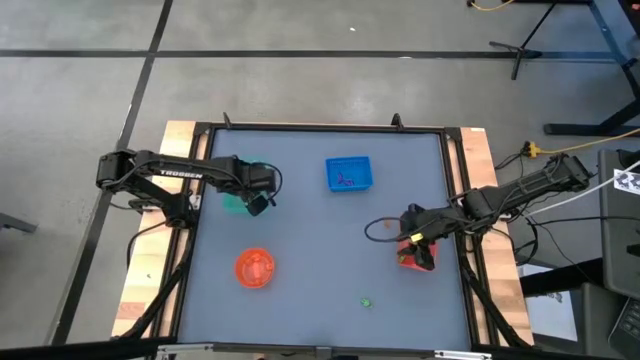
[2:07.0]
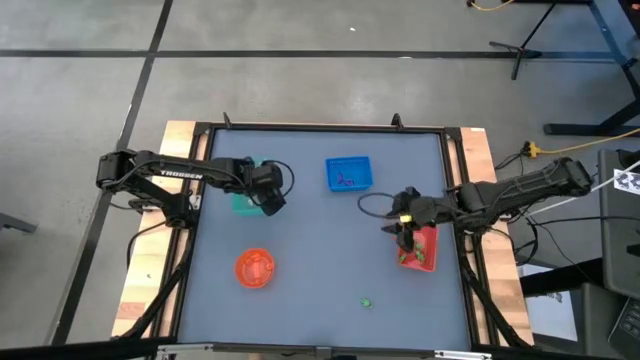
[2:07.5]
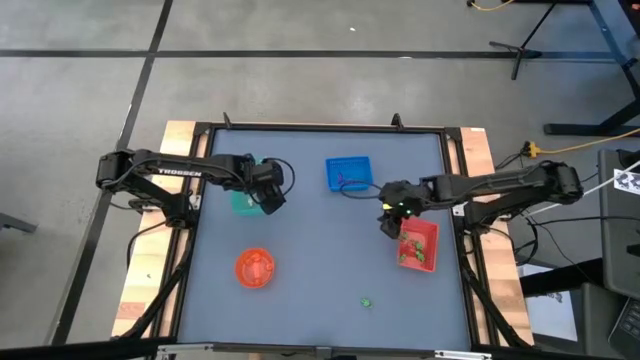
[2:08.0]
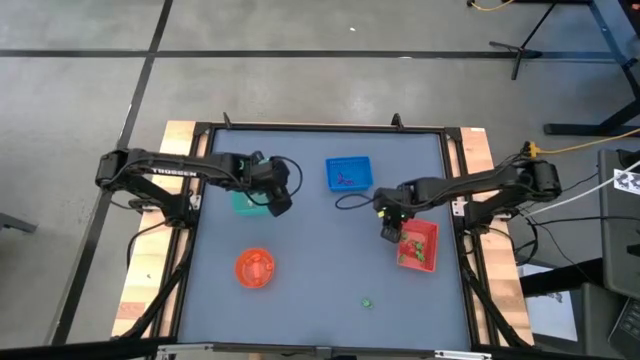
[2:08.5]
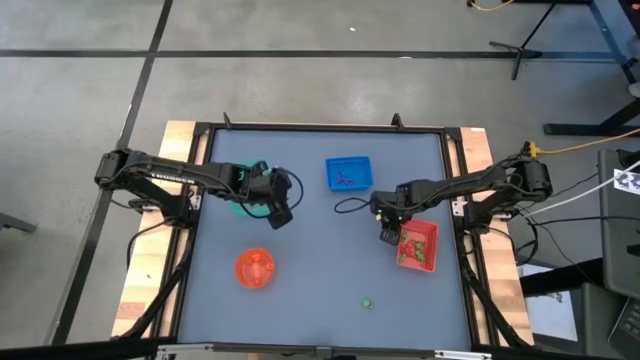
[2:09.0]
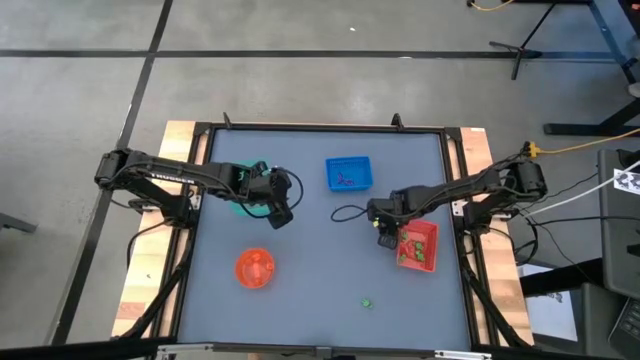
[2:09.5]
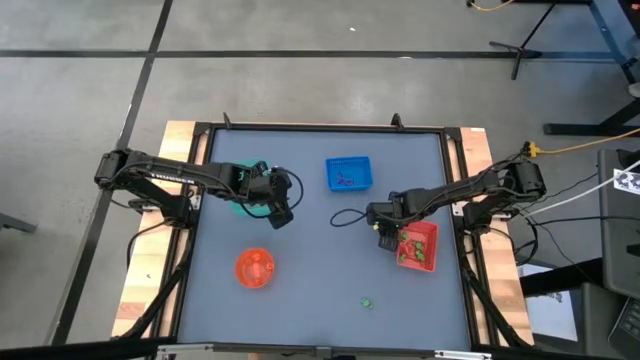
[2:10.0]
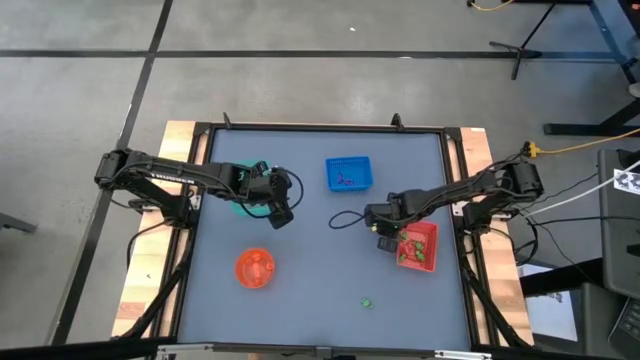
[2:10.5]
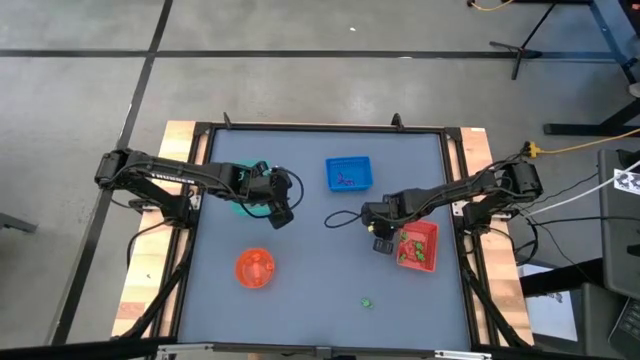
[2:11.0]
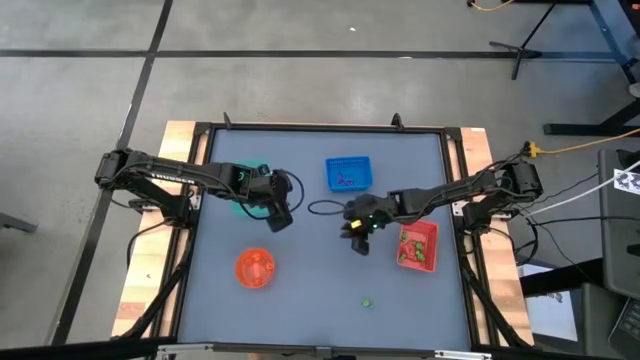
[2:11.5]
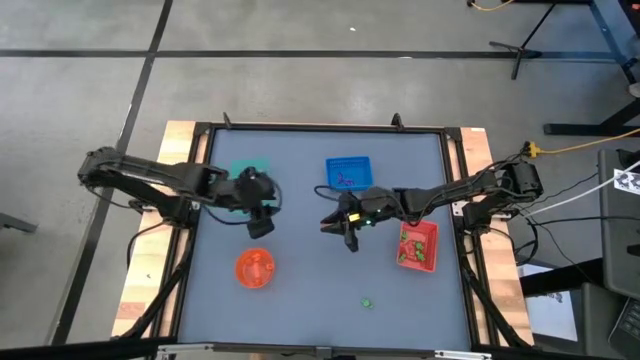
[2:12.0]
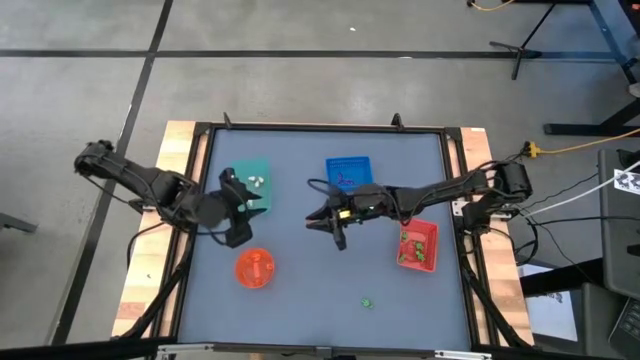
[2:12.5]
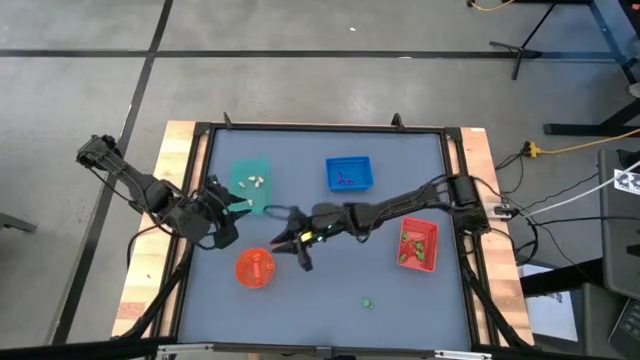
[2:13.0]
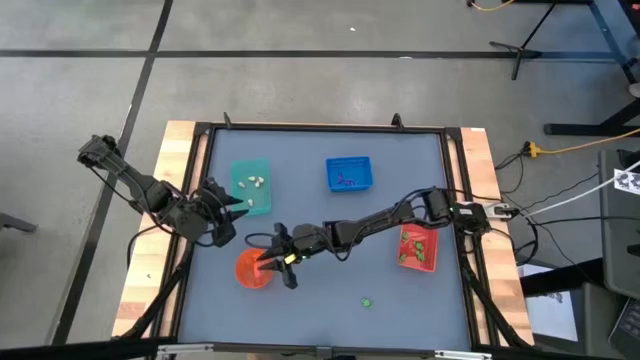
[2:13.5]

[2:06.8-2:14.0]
Task: Sort Halloween decoration
Put the orange pumpkin toy into the orange bowl

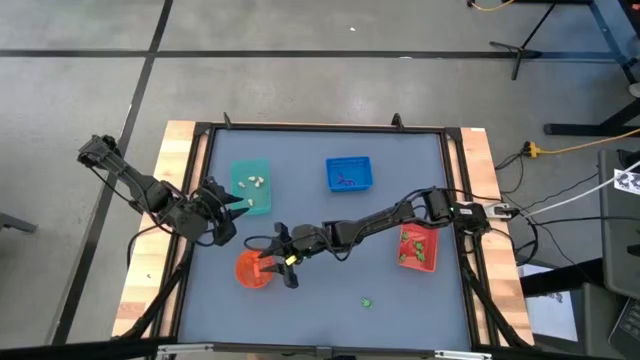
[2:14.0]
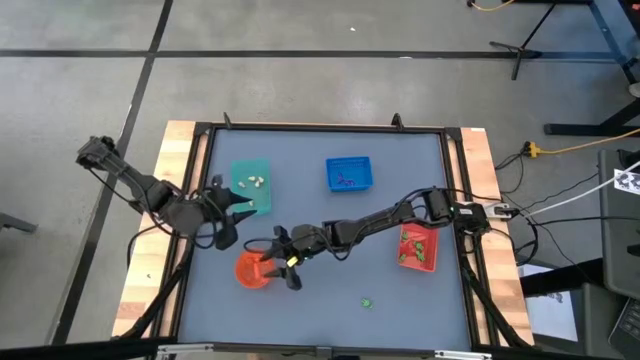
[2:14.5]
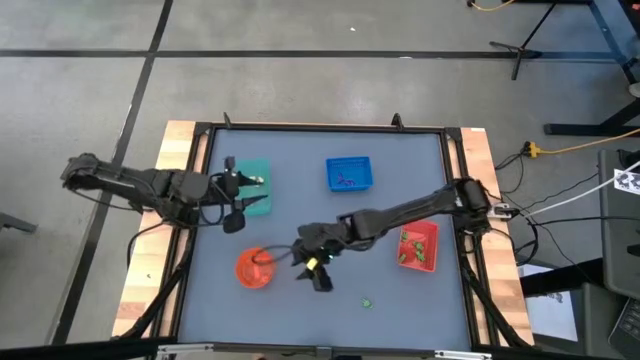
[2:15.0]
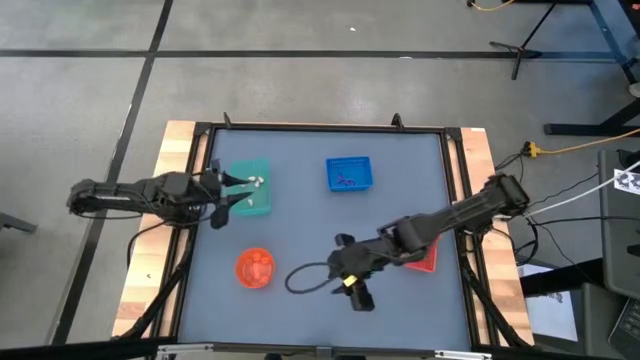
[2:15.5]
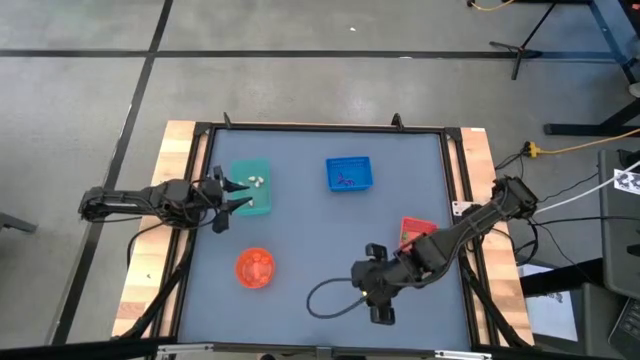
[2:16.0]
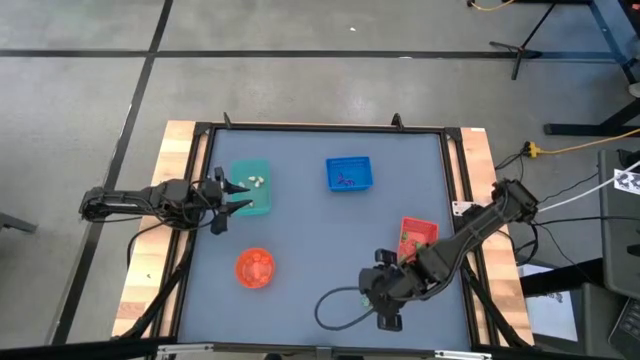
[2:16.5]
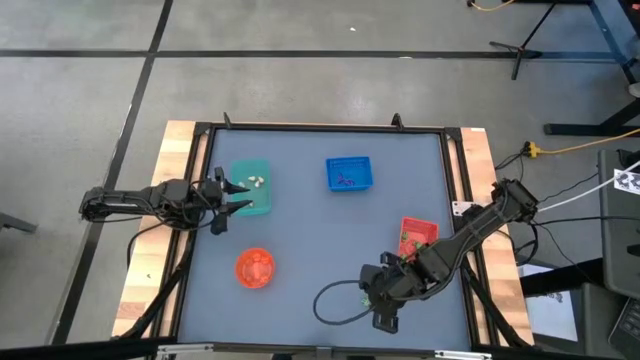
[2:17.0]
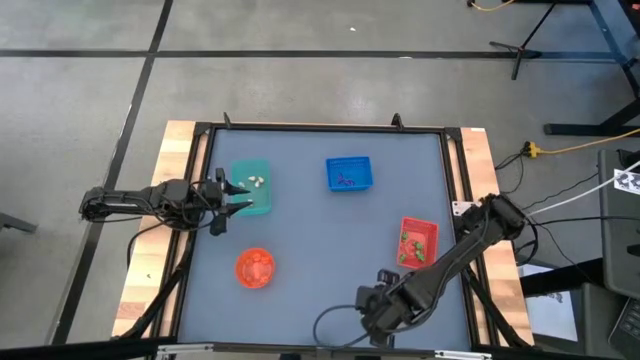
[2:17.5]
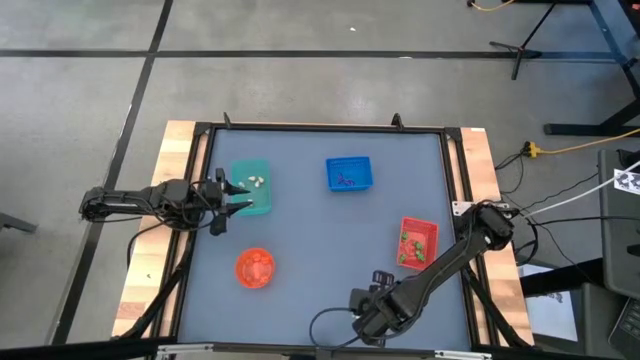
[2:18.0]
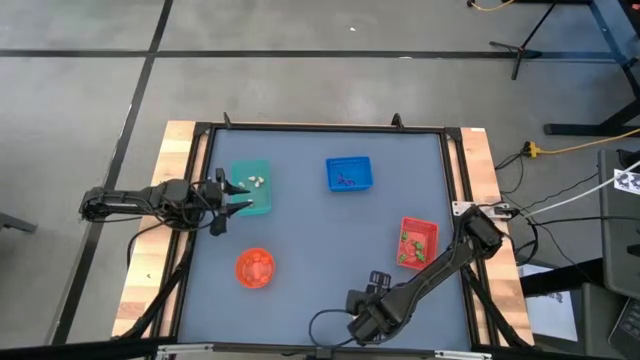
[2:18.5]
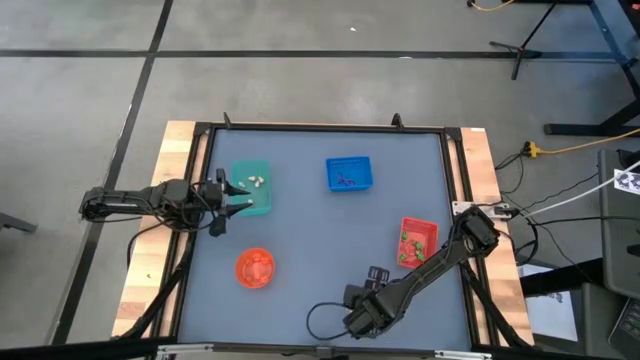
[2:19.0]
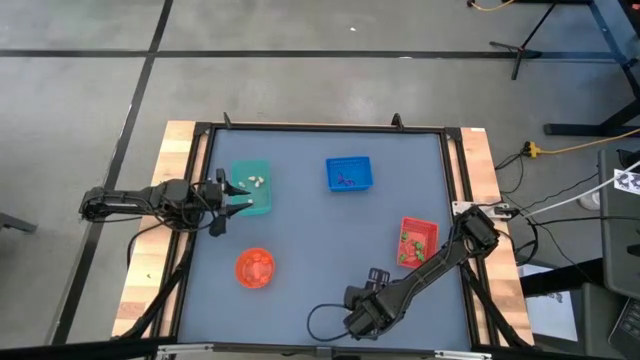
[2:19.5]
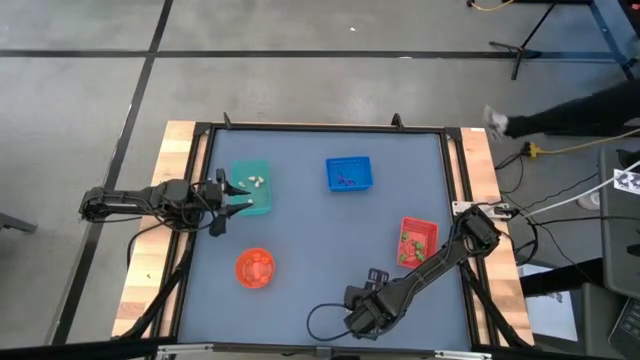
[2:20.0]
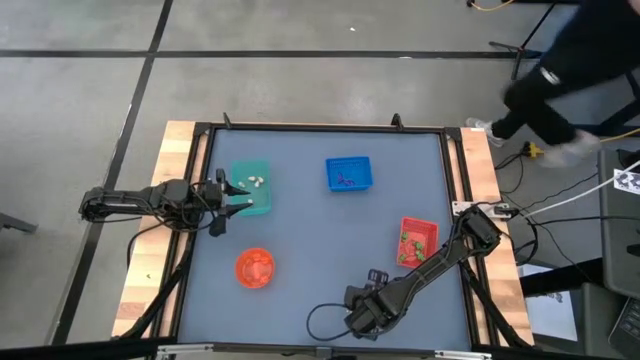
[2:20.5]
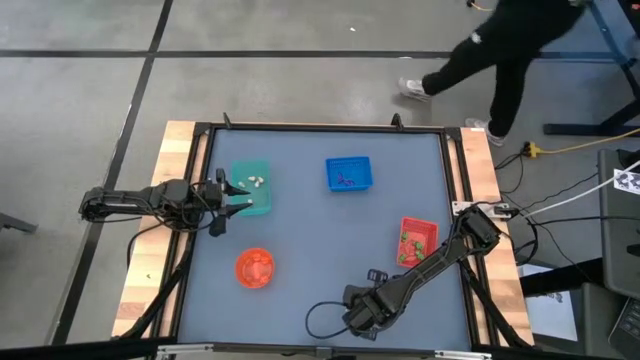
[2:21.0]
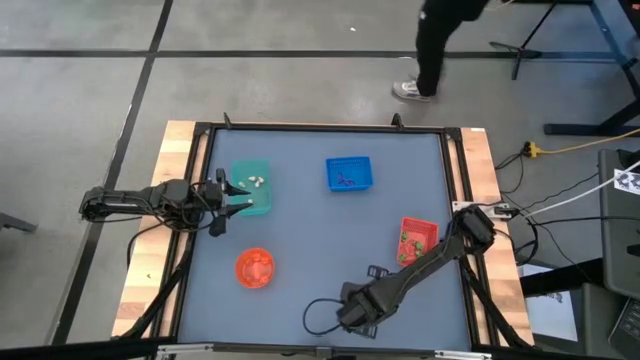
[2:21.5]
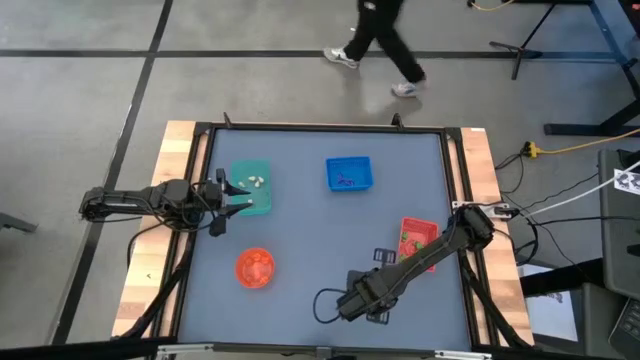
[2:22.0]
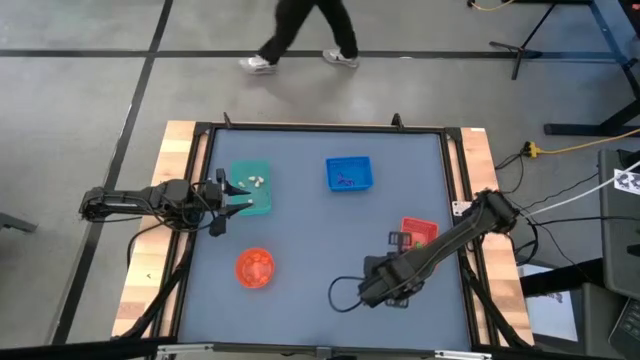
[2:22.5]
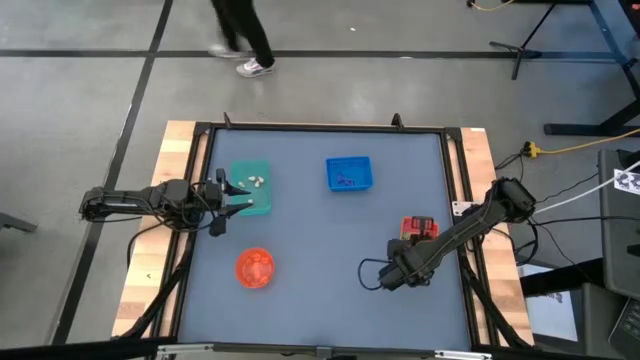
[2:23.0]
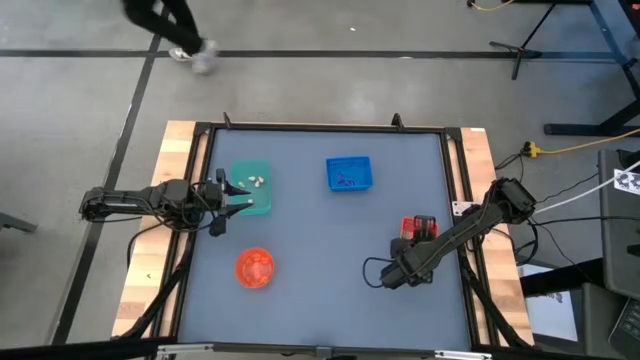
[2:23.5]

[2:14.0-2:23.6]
Put the green skeleton toy into the orange bin

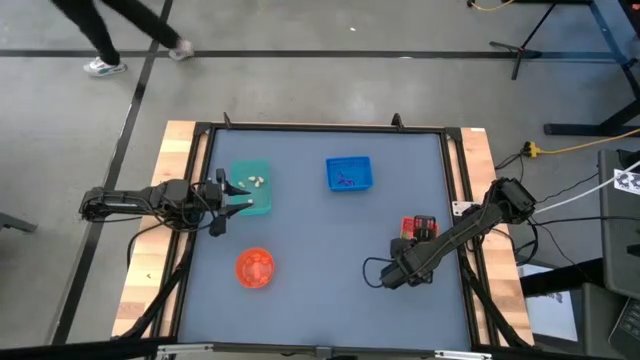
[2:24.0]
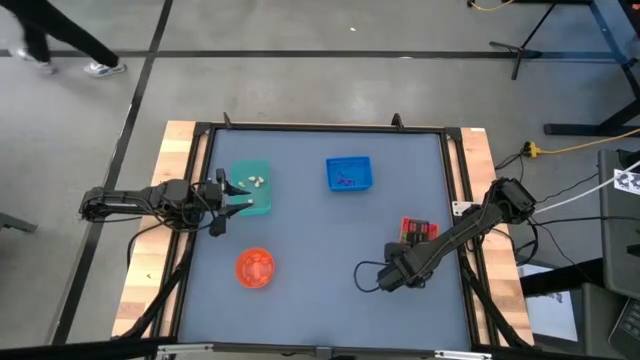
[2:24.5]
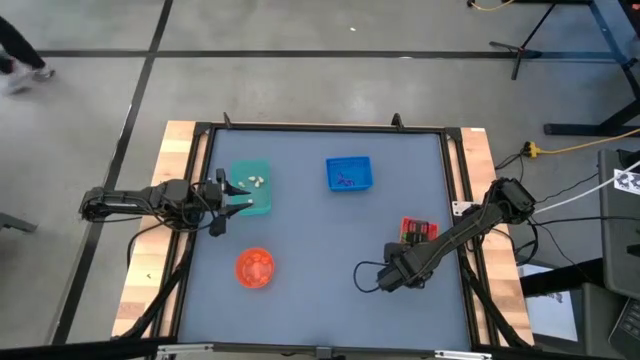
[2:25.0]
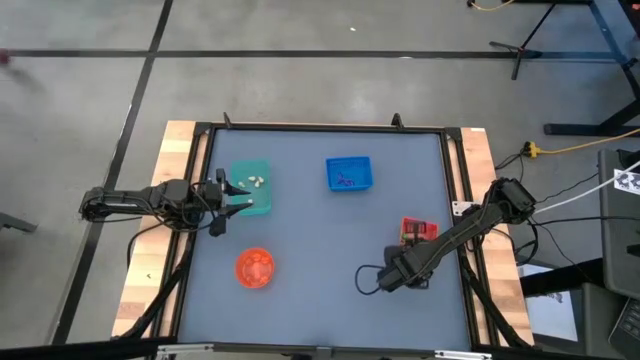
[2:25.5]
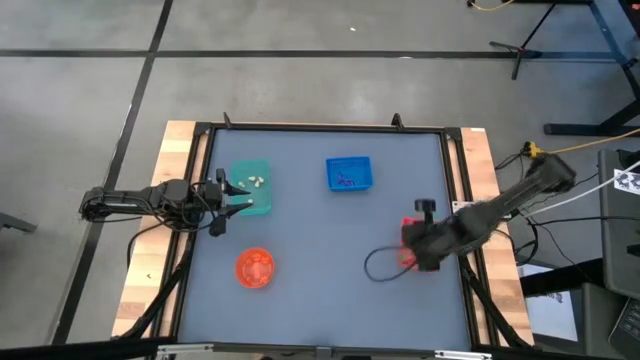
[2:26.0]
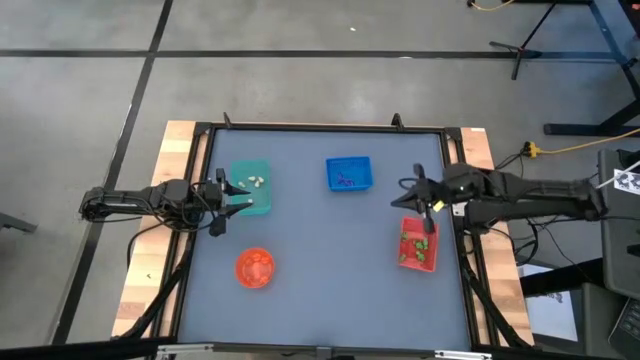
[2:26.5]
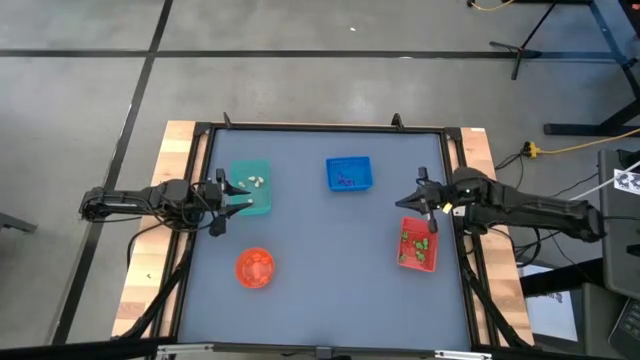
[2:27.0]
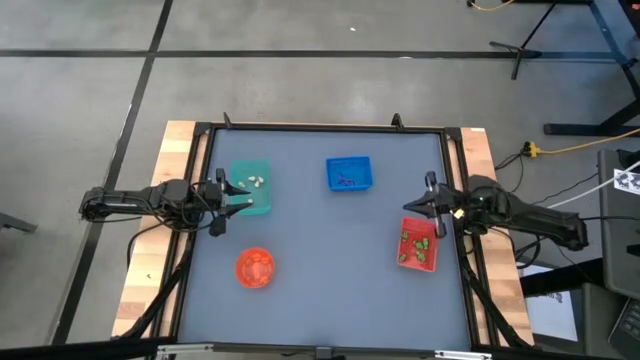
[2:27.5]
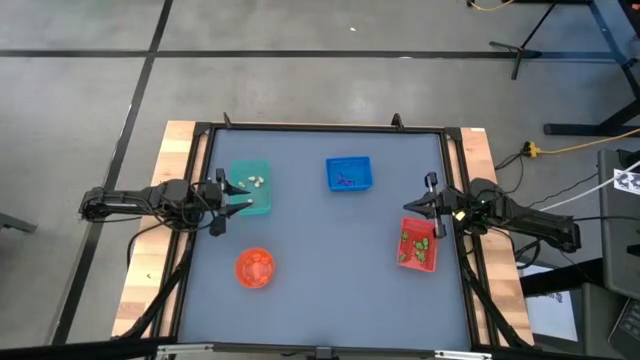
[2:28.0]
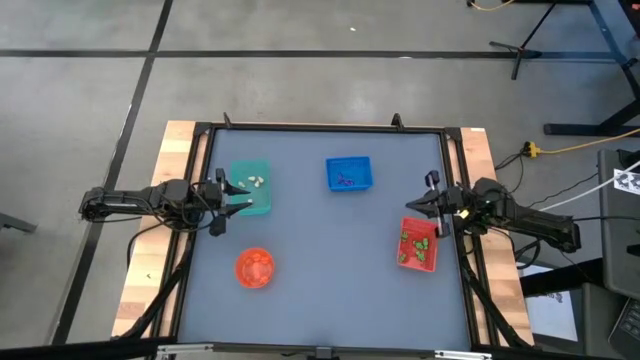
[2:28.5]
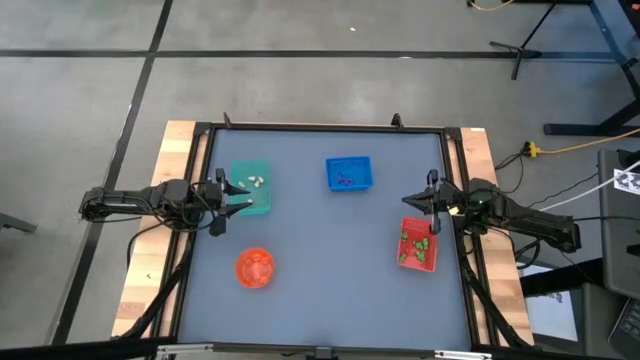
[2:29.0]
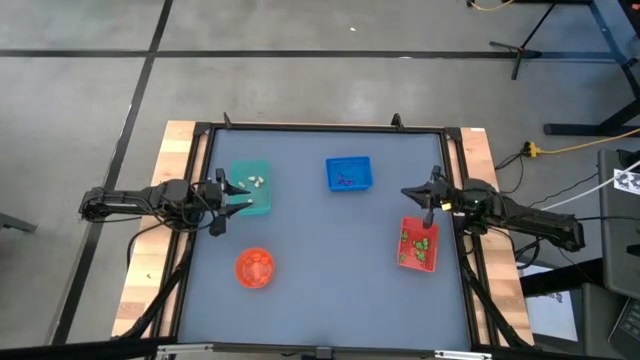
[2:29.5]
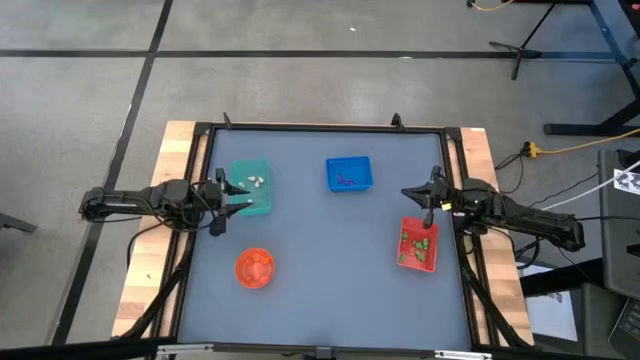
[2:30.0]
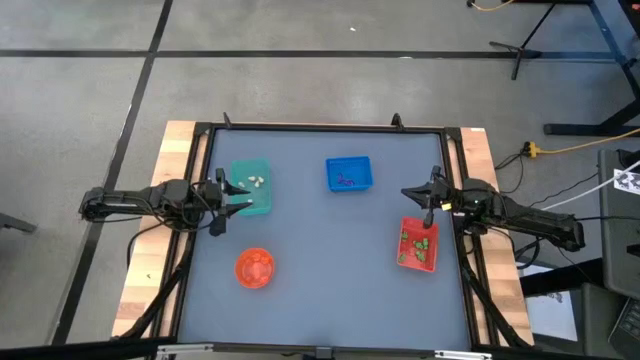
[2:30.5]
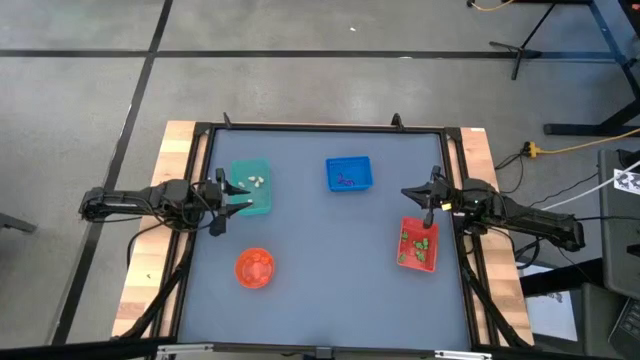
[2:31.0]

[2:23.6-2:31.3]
Return to Home Position
